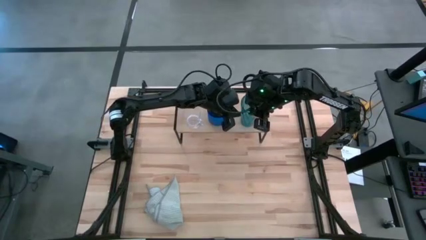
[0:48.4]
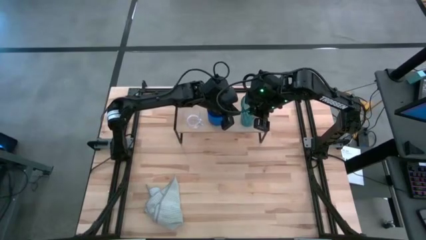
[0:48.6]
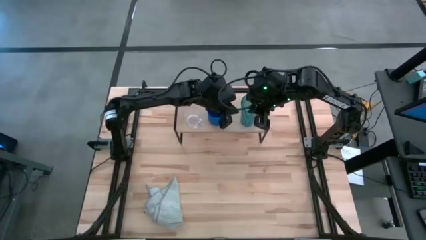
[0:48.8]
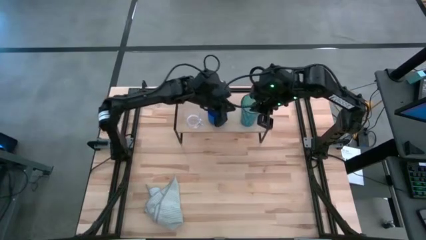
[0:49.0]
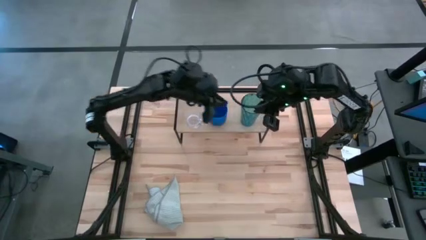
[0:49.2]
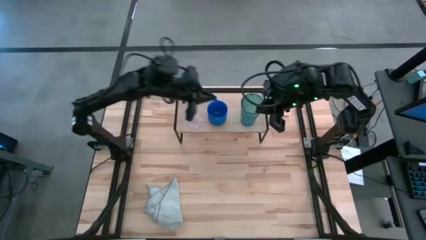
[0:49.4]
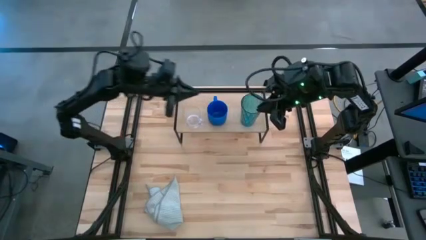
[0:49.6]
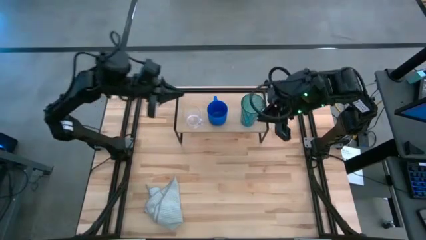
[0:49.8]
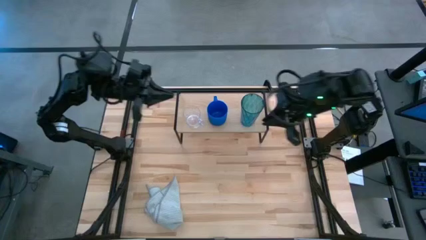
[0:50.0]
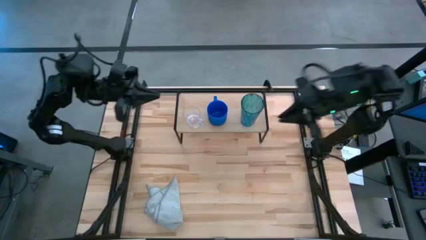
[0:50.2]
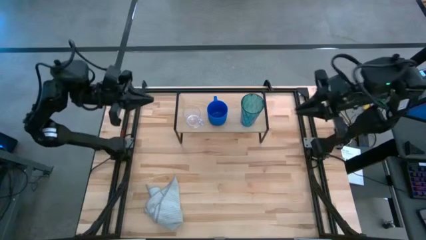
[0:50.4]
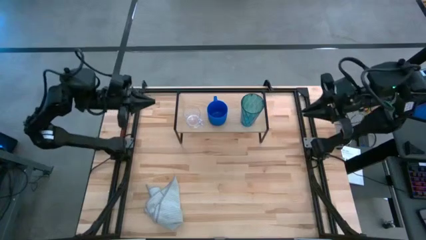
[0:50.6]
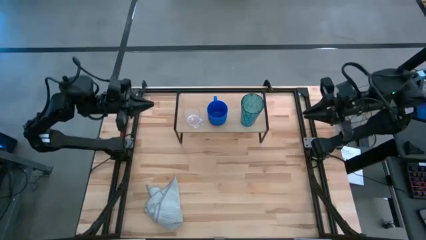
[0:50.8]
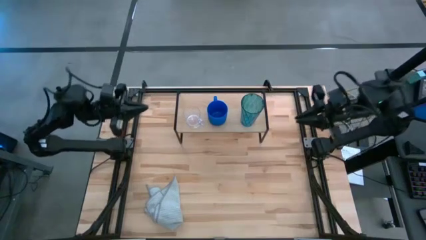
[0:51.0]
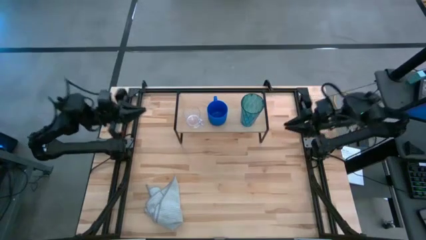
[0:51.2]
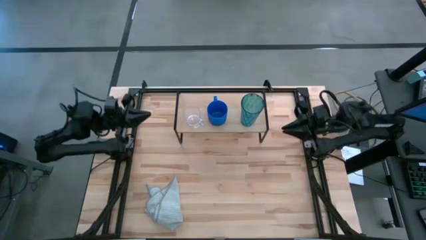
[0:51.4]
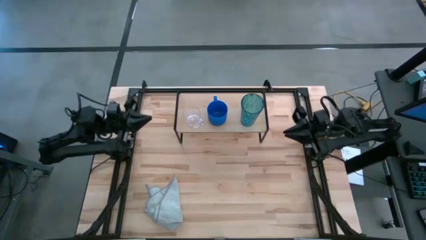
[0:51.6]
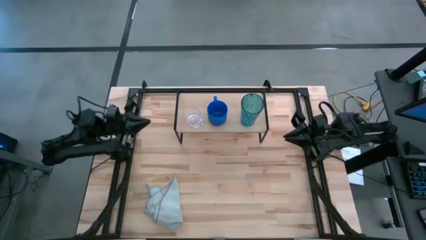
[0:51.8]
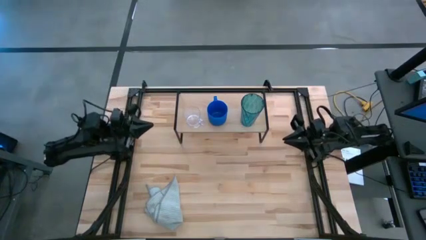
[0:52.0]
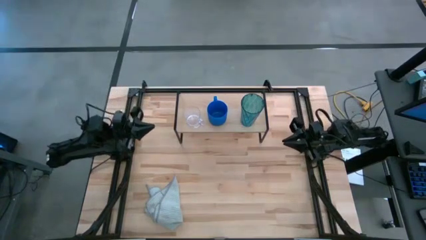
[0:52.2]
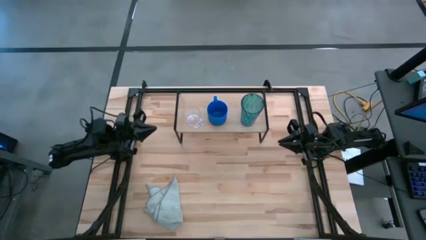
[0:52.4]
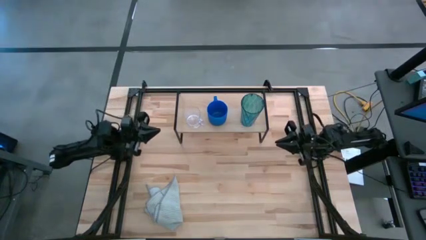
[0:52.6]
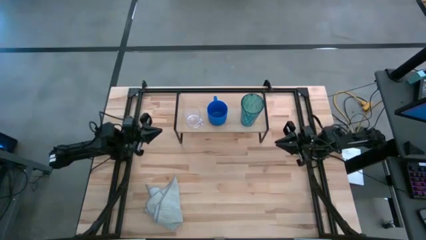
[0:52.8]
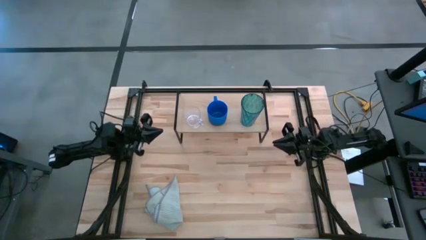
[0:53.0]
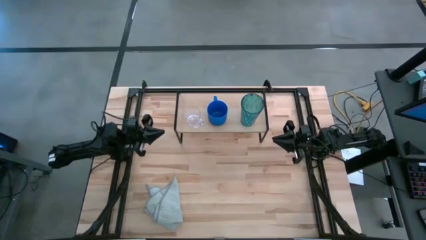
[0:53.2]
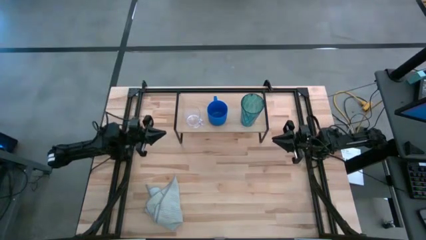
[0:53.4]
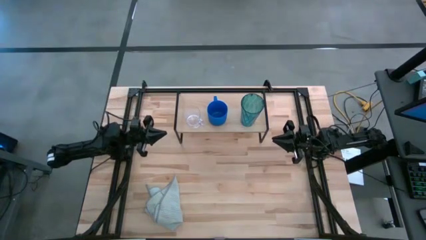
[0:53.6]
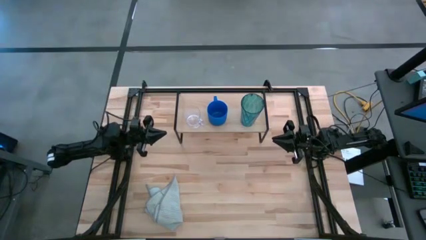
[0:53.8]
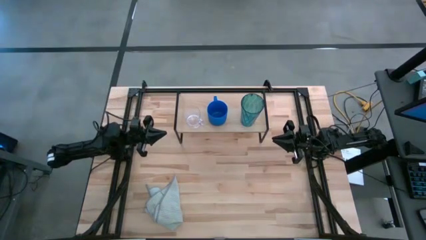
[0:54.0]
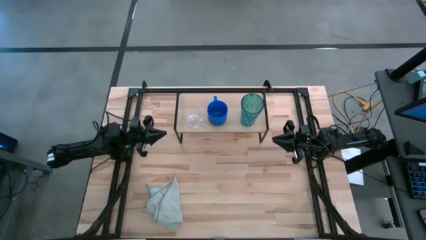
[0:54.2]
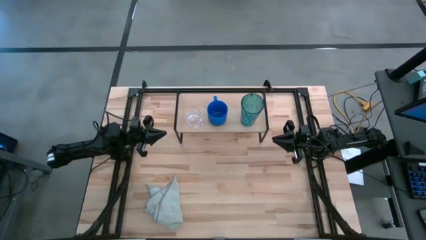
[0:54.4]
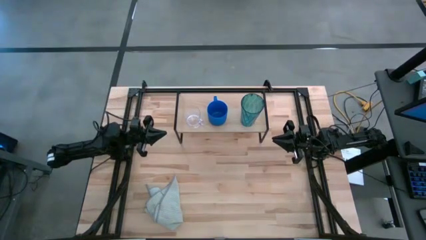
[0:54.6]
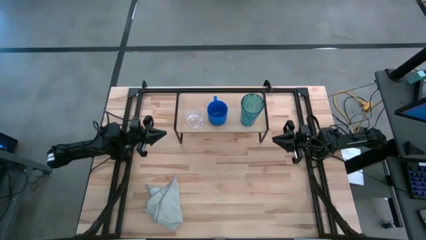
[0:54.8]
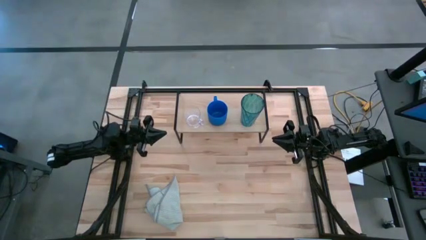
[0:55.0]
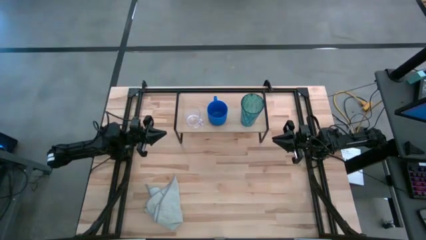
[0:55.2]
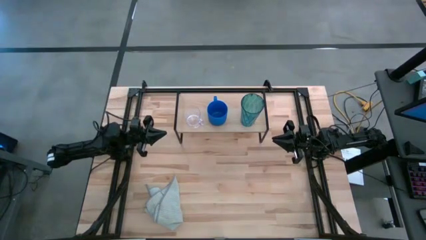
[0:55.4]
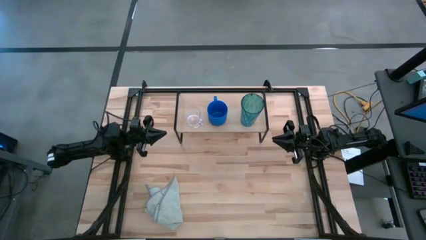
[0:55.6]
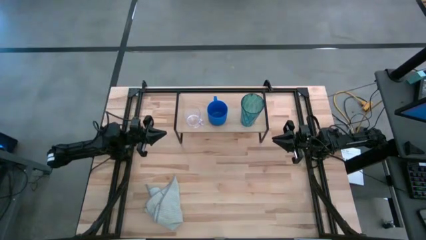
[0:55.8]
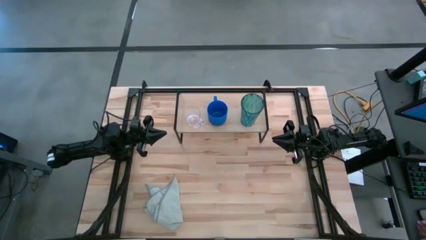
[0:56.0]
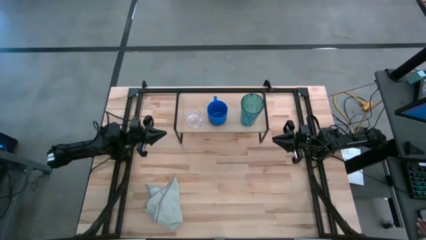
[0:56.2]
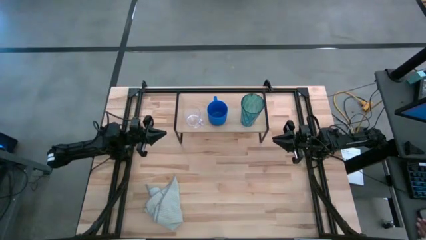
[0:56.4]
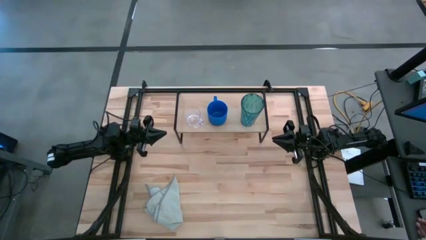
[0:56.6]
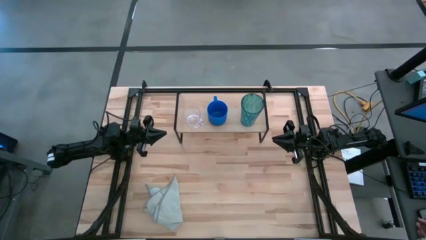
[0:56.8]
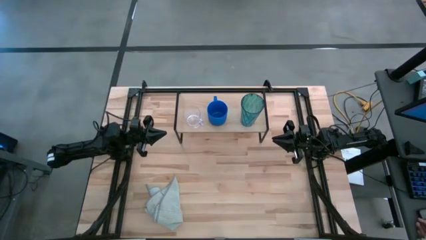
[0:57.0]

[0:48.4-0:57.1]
Task: Stack small to large cups/mugs on shelf
Return to Home Position

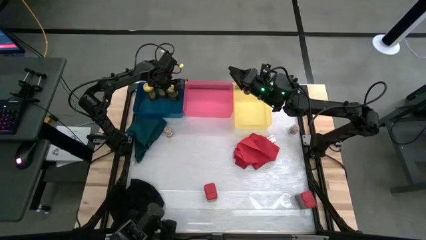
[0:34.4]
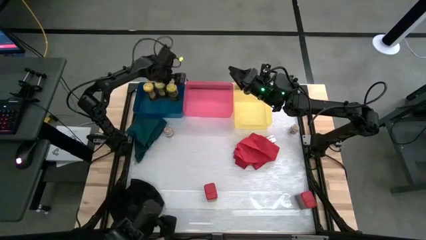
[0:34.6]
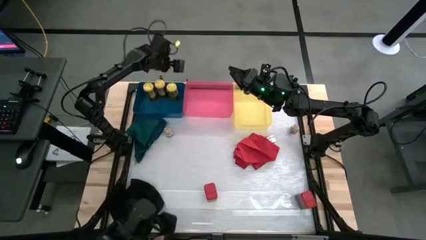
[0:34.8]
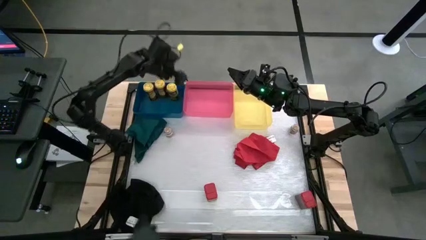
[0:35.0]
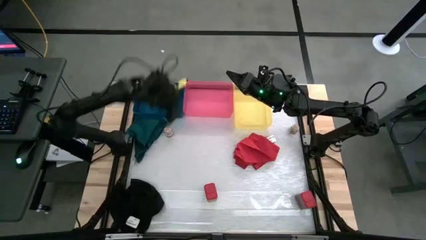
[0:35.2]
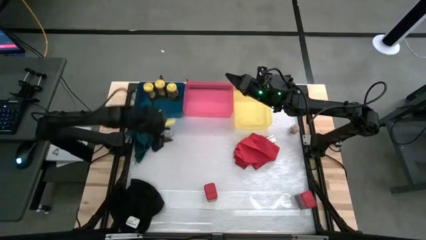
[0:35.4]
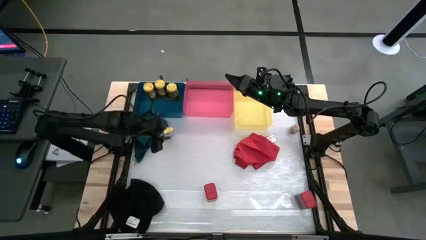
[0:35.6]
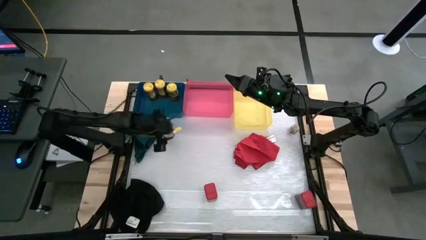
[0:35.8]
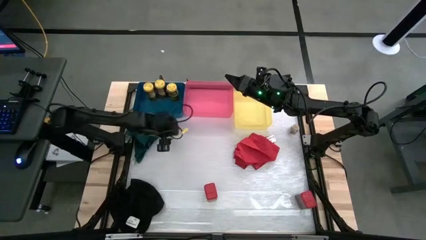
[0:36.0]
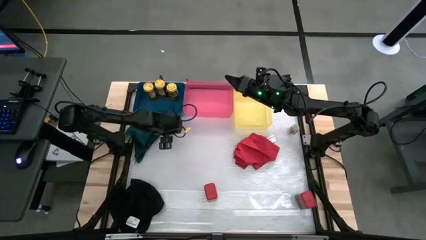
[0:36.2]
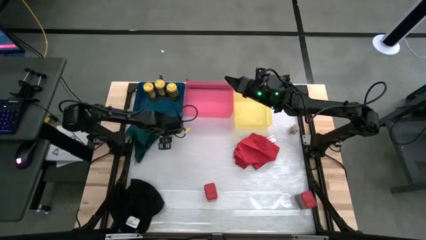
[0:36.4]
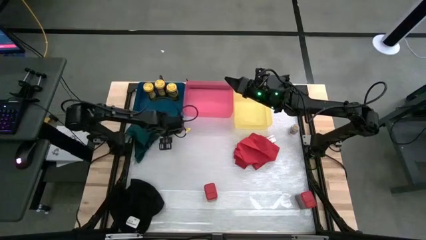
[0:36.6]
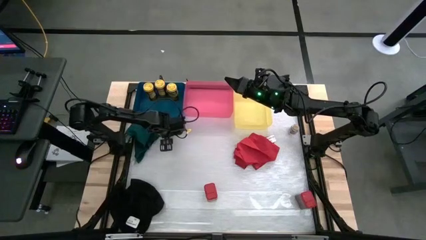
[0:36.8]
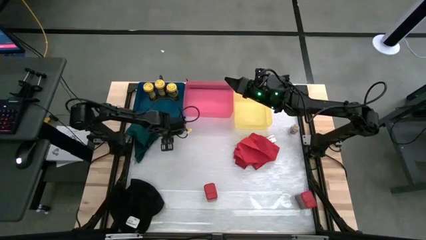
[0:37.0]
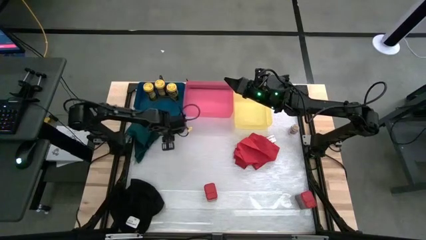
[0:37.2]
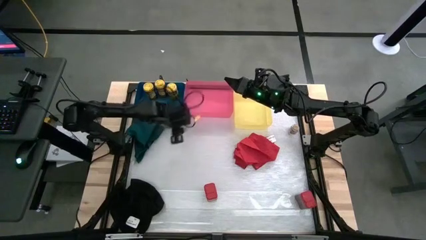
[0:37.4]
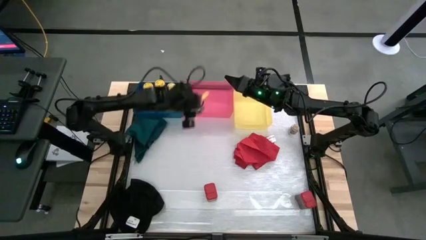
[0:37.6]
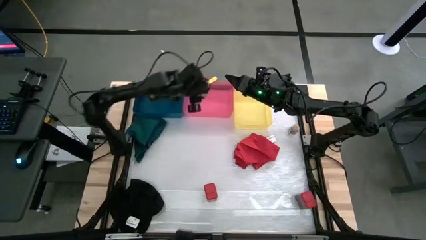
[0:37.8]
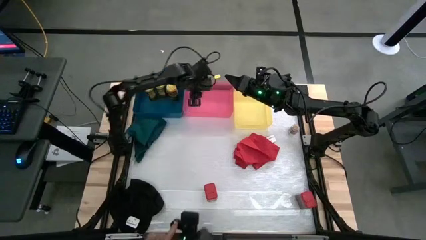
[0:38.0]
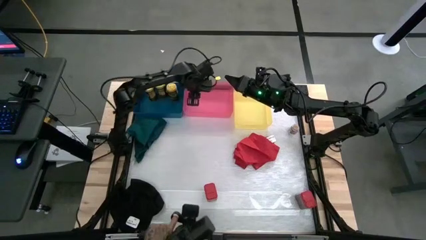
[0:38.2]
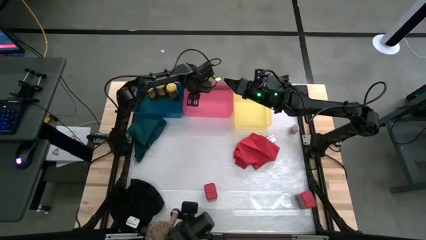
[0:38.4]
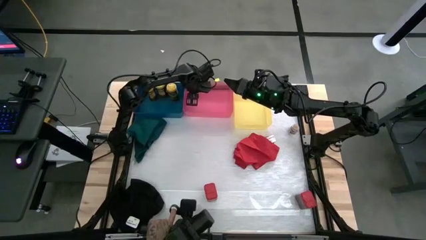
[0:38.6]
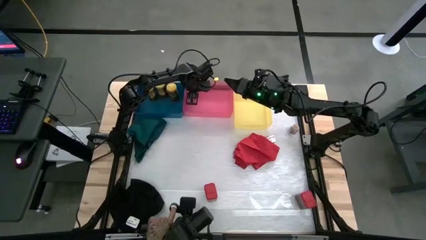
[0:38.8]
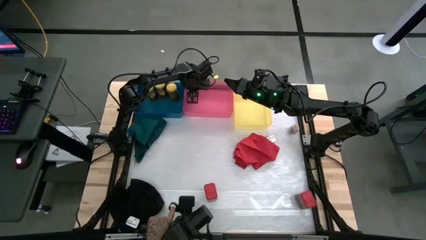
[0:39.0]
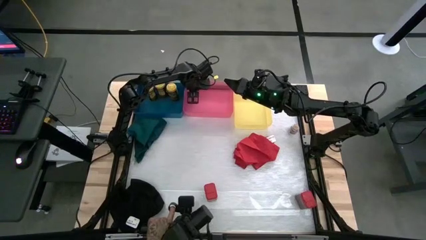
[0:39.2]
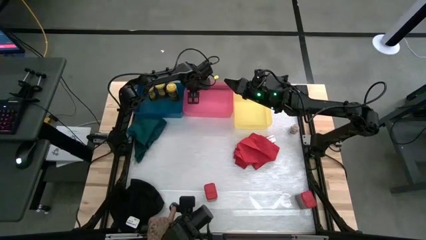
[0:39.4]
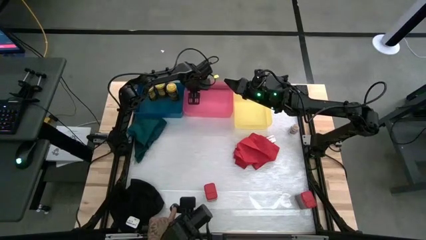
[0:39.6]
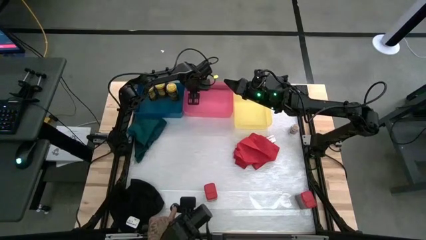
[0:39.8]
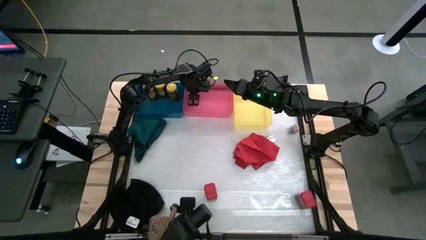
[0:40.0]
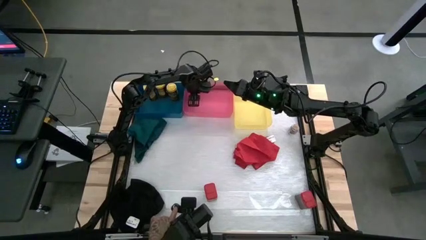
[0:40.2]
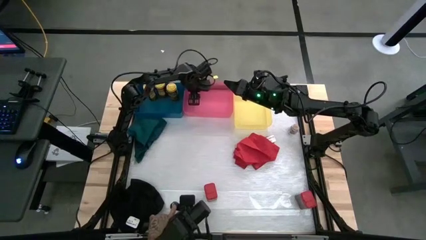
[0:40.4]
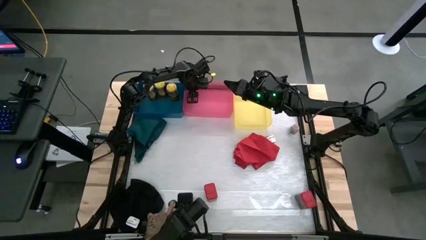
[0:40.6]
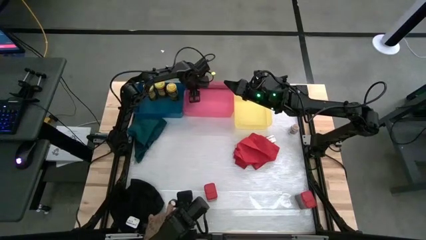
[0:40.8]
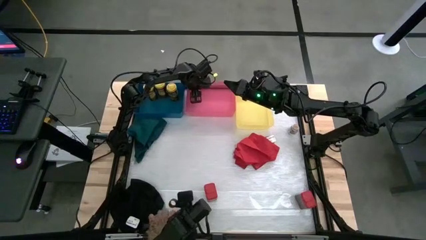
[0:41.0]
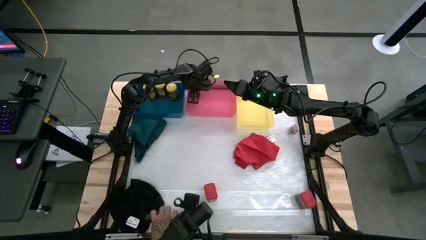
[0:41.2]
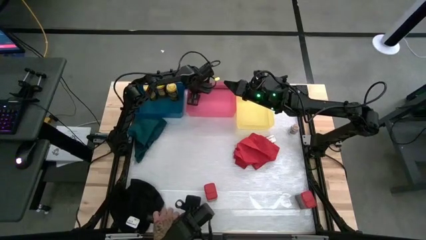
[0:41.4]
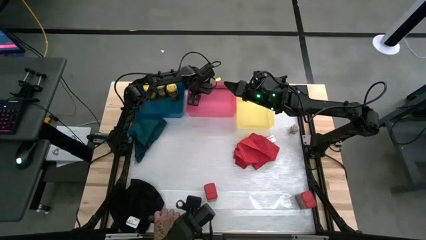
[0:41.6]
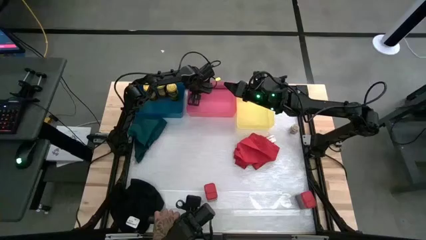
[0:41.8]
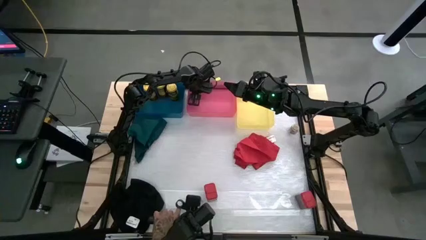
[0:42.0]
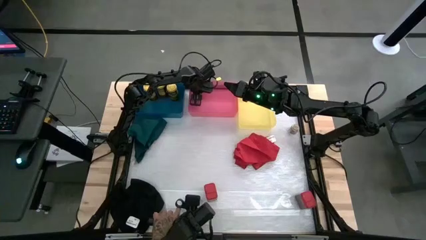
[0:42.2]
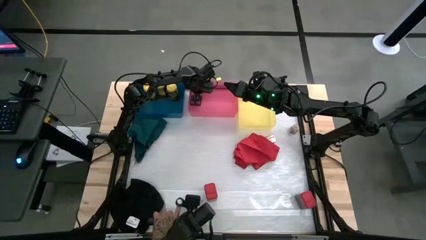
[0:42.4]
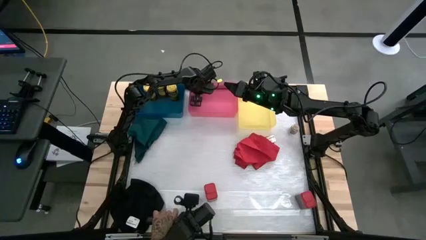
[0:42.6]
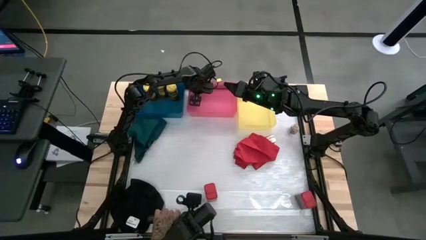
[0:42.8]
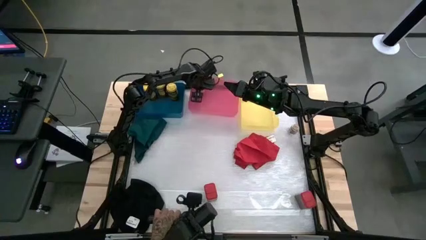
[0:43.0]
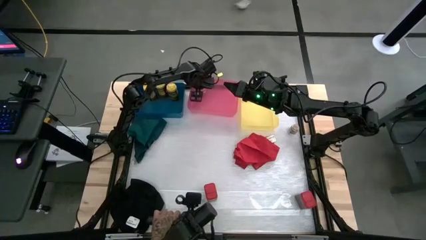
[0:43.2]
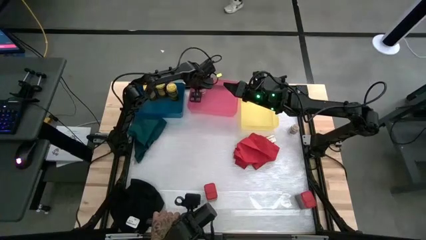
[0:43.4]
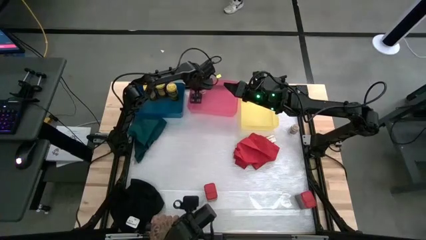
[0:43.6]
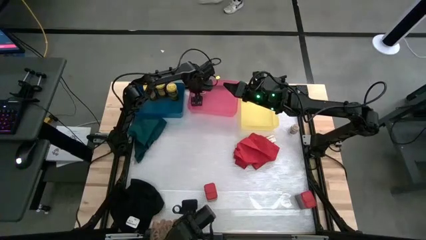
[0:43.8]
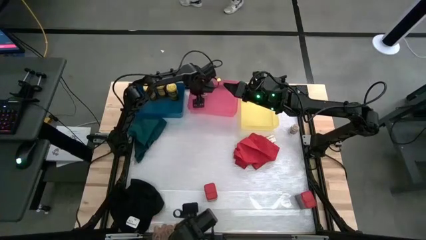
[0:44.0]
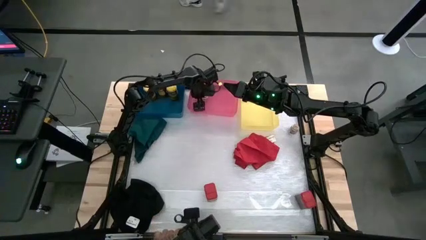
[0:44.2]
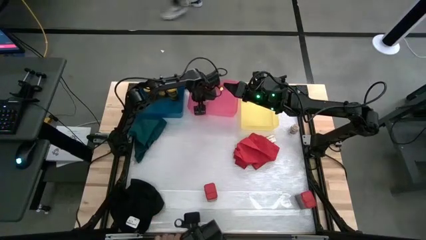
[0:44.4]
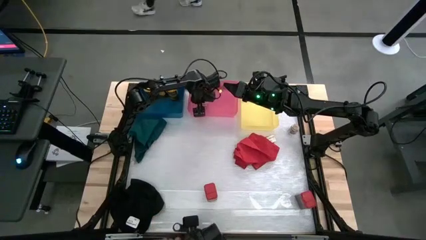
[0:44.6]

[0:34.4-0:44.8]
Task: Sort spices by type
Put the left brown seasoning bottle into the pink bin
